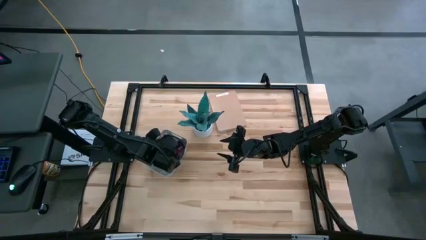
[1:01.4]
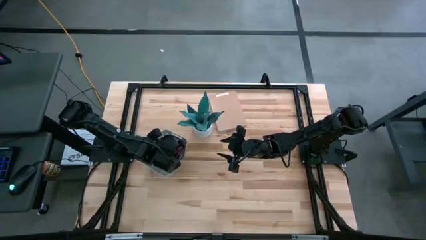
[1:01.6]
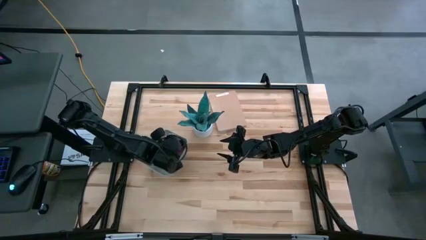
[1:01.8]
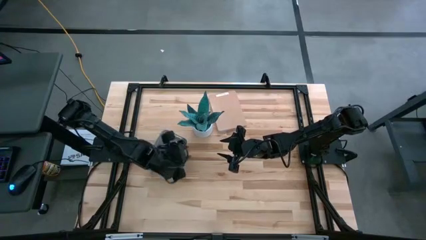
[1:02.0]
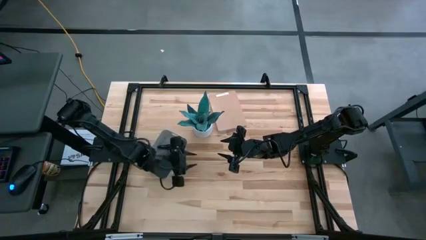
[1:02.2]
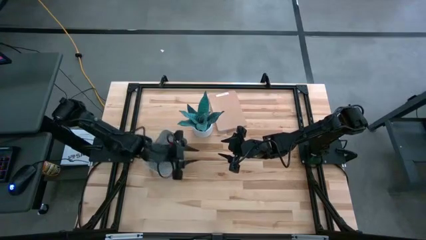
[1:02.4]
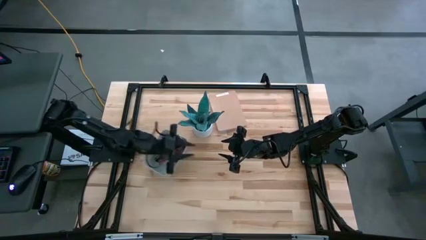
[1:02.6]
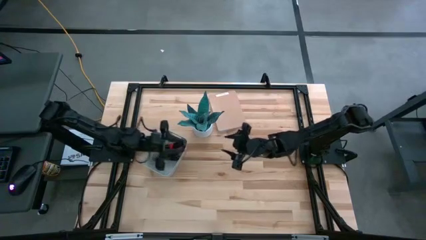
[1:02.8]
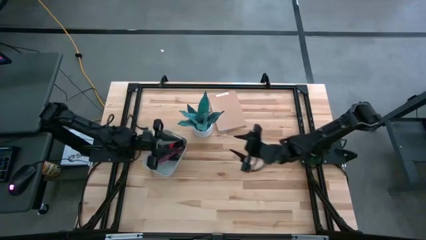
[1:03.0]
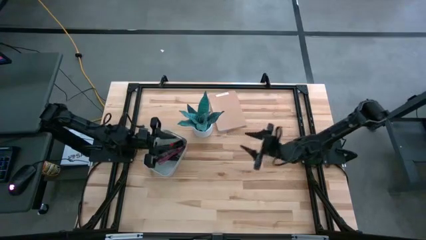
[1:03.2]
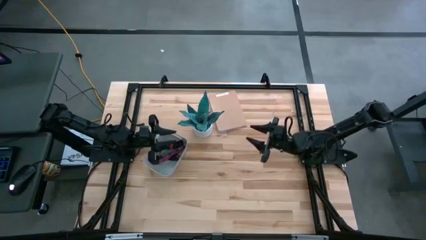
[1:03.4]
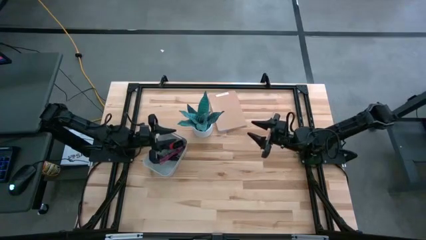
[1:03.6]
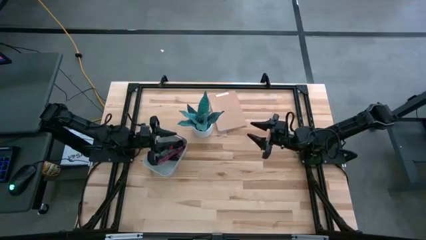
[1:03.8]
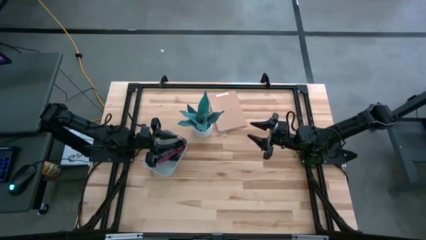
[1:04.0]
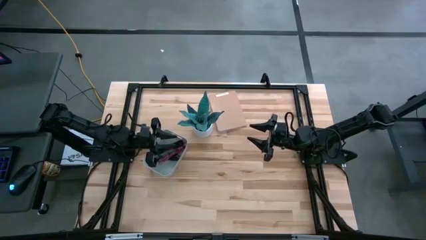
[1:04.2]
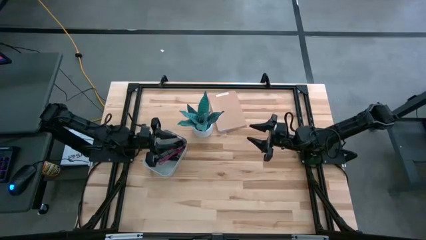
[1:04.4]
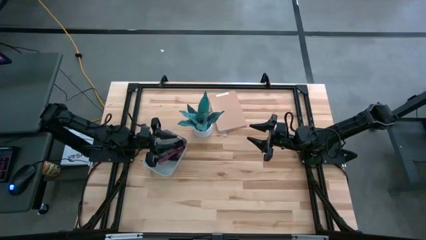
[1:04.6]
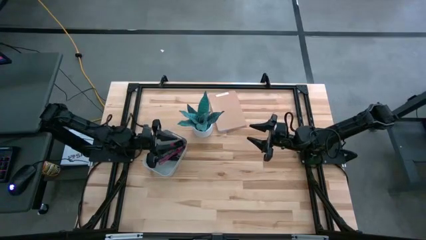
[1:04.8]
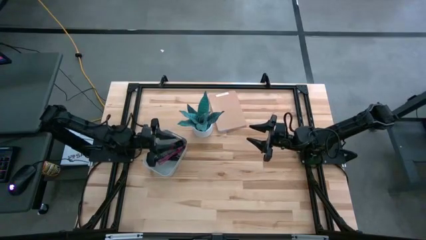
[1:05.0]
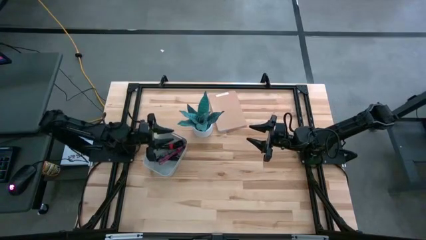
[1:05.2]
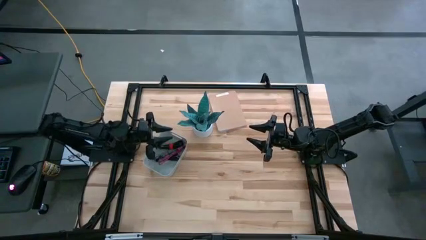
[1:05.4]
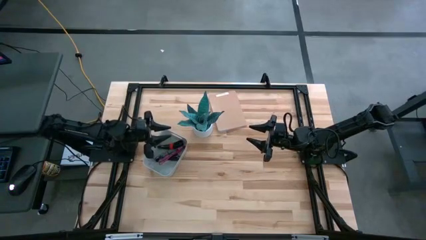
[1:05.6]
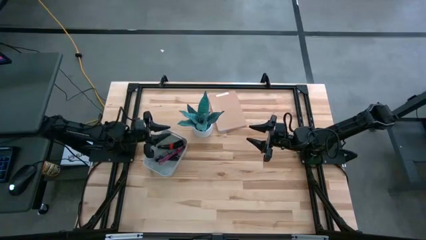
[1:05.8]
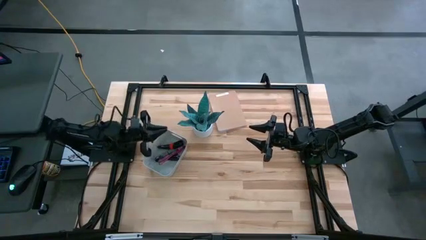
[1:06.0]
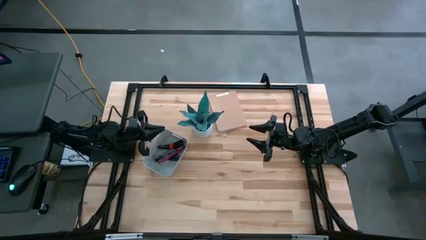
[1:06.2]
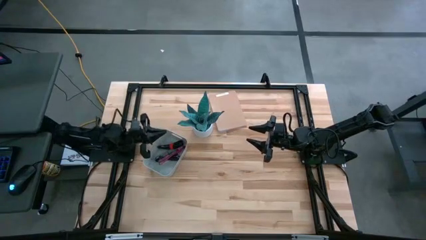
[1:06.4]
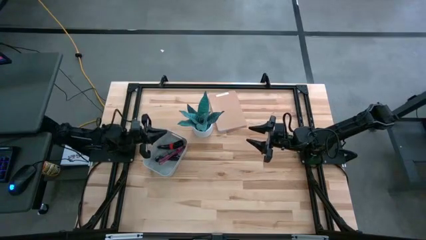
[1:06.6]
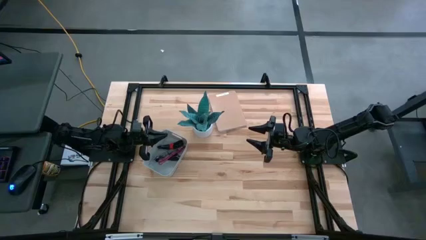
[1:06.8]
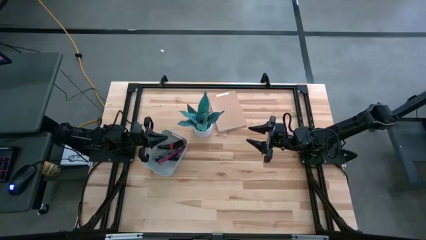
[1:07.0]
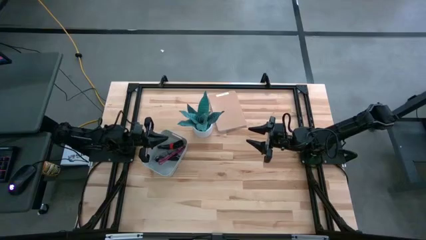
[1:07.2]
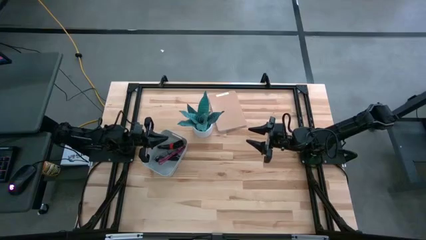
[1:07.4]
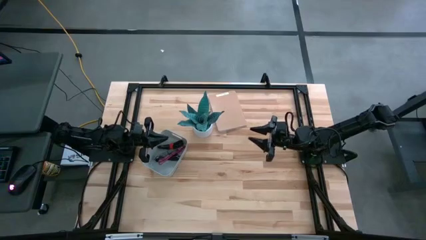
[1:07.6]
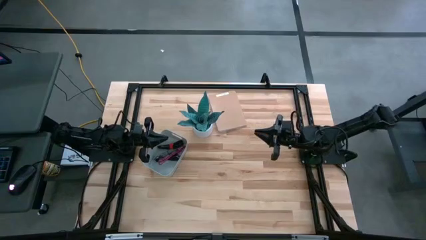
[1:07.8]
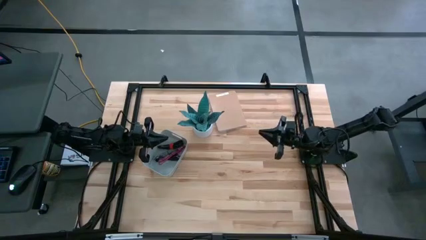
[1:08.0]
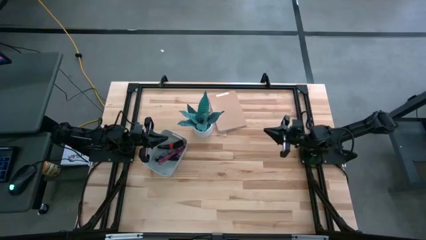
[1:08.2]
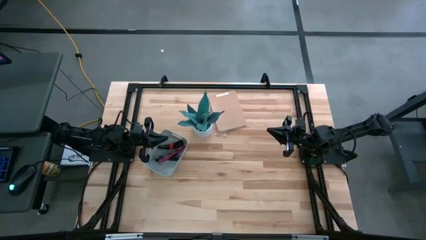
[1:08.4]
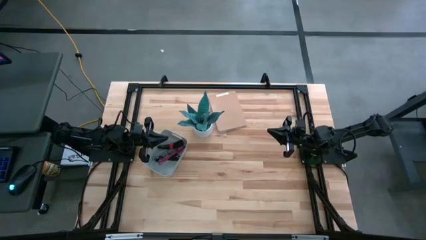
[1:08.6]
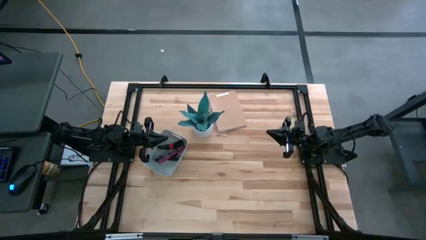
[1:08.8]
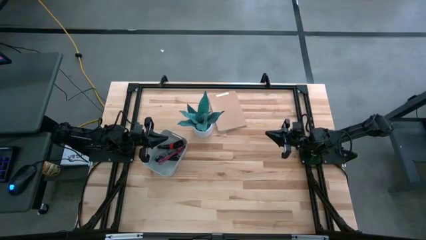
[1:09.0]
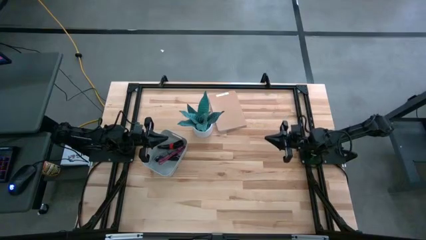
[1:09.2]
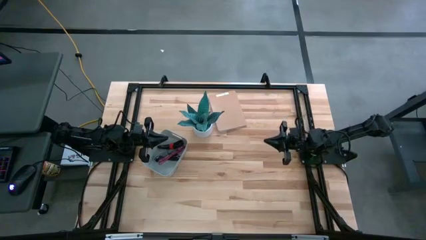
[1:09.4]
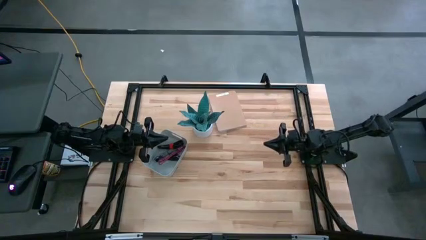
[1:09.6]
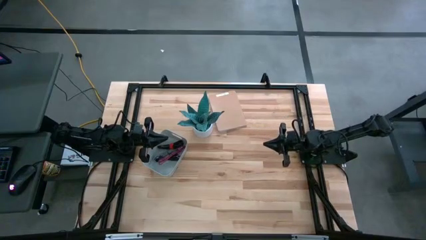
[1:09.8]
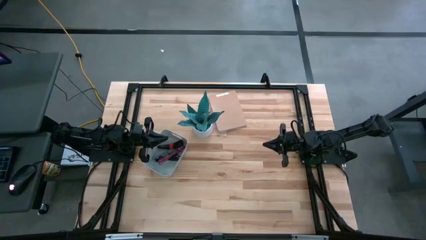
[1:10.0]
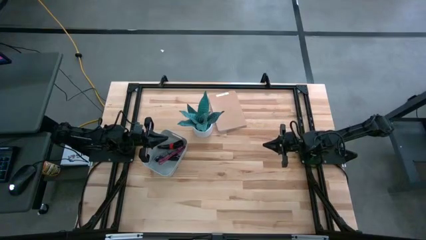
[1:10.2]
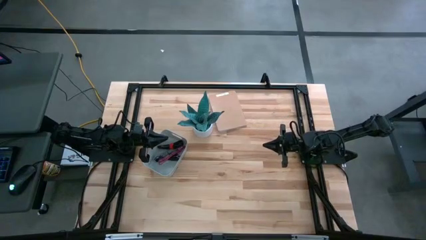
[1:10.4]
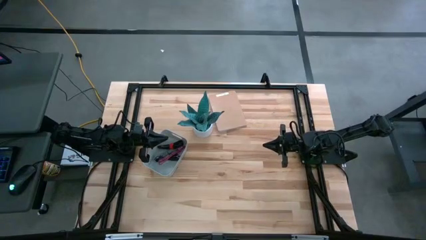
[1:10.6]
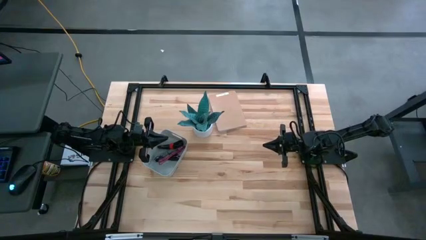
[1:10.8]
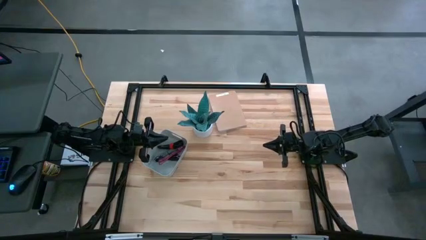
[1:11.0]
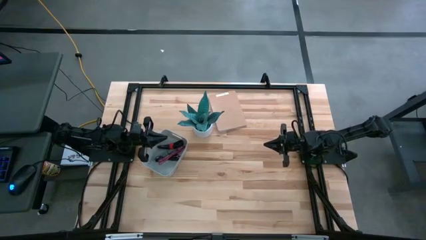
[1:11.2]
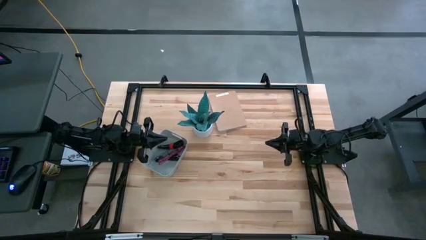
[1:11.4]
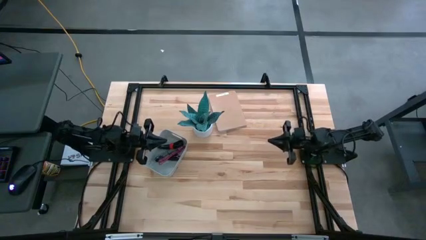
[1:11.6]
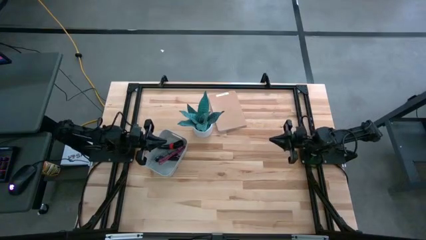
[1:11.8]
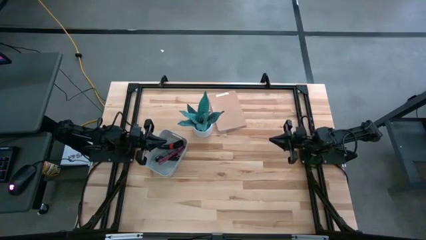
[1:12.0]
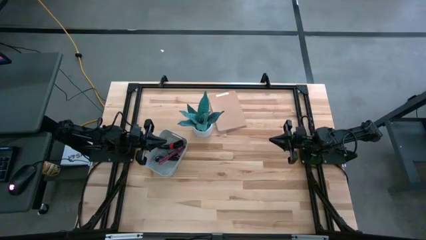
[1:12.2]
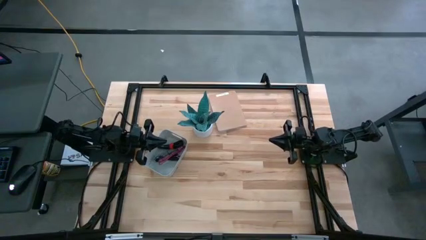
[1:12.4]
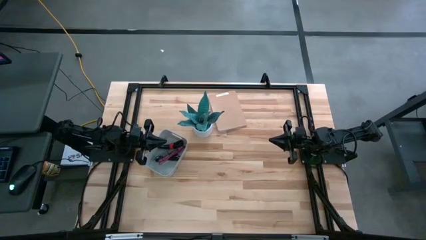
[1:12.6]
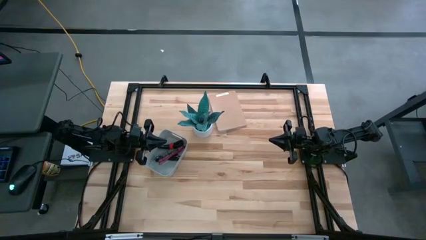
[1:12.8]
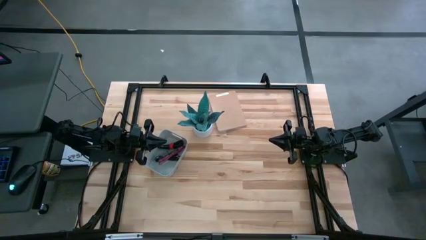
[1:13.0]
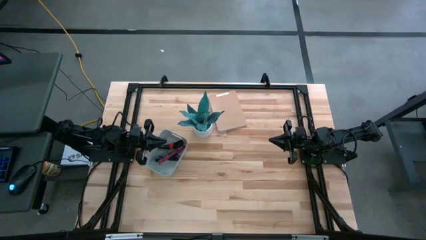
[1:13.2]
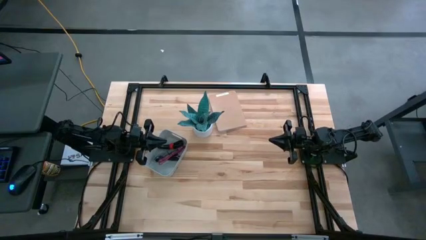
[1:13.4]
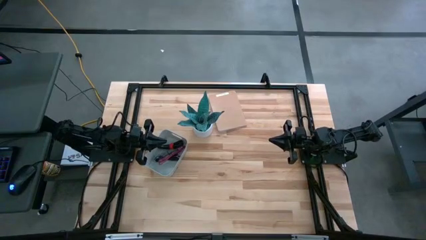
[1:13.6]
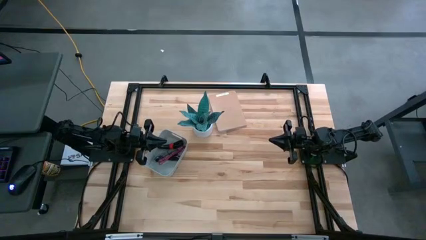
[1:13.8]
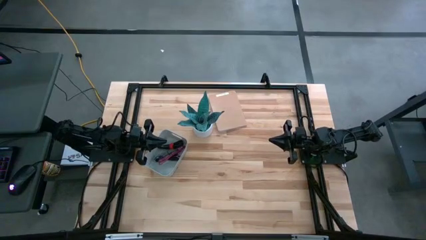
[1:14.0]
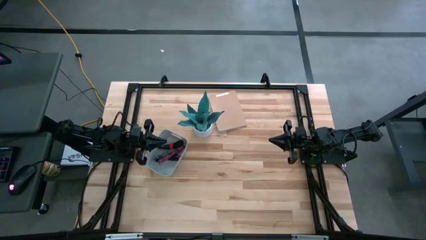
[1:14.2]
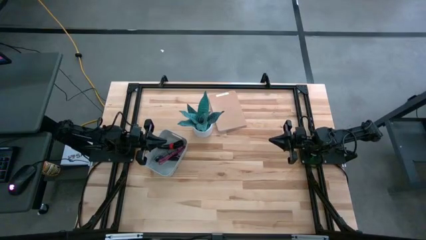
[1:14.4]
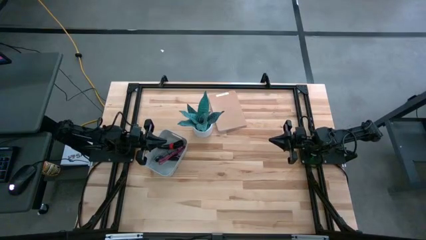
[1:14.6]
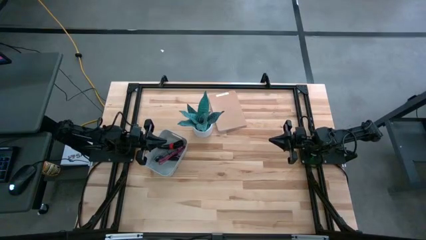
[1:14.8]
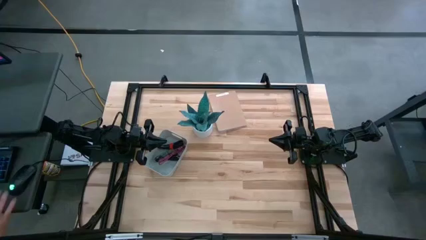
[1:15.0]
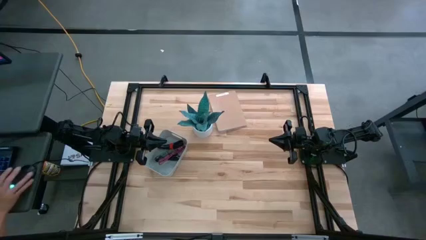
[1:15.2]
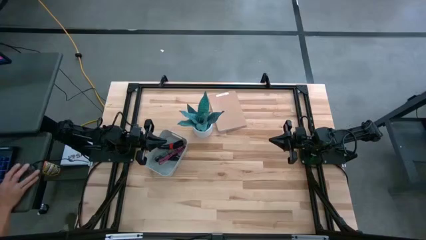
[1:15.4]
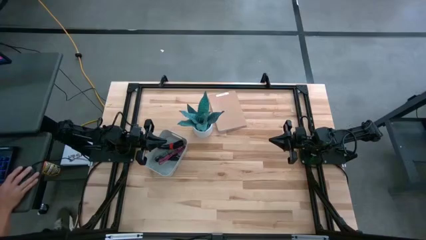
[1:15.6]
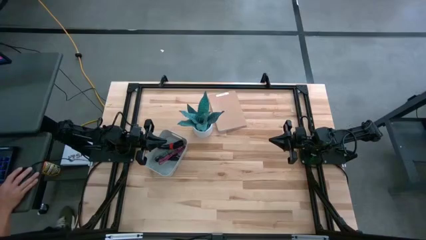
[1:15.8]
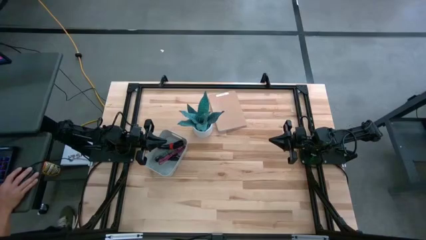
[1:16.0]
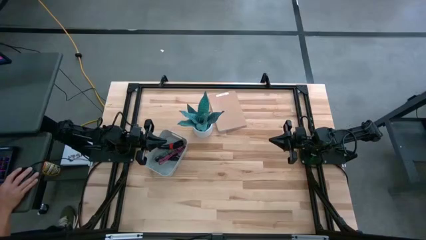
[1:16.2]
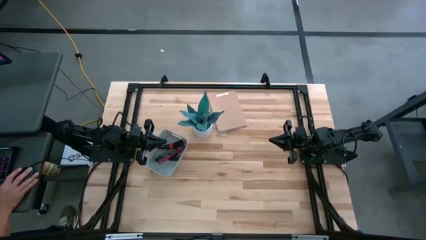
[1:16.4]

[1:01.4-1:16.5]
Task: Pick and place USB-C Cables
Return to Home Position
